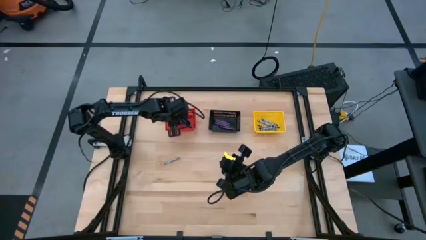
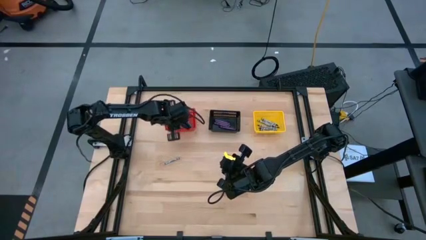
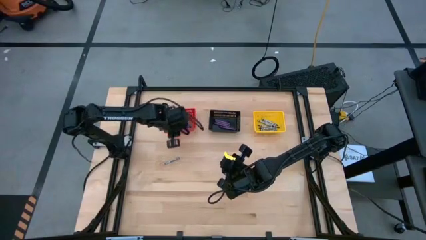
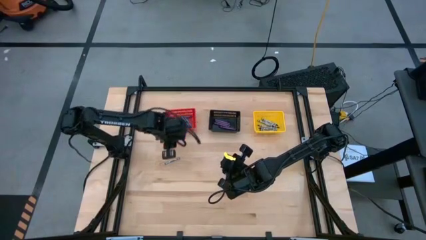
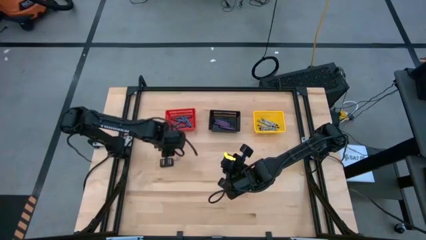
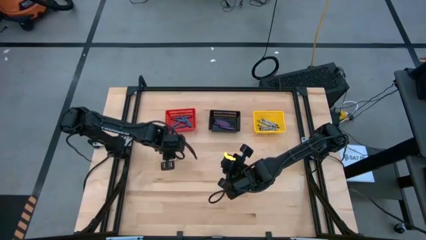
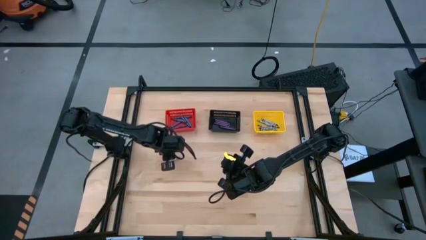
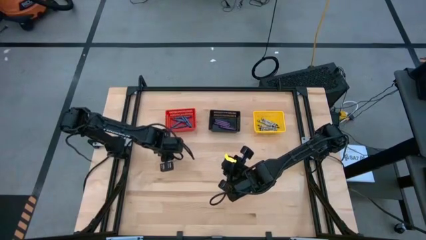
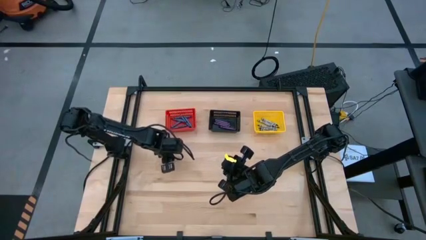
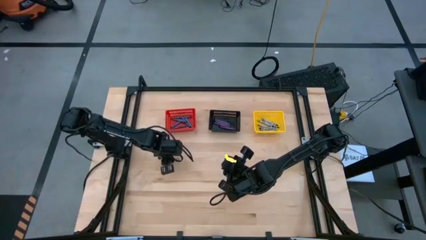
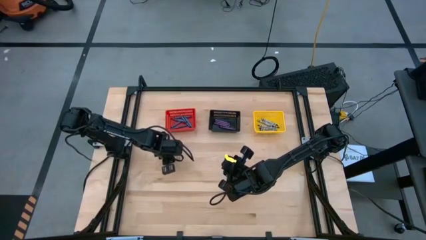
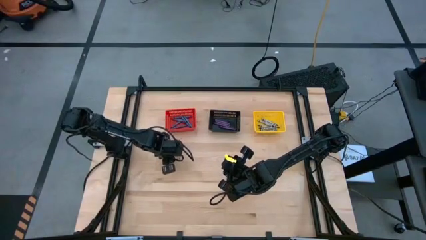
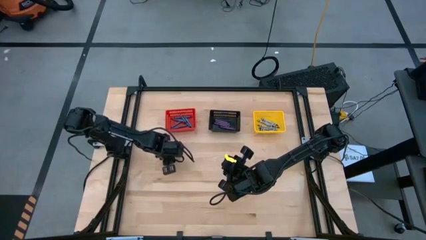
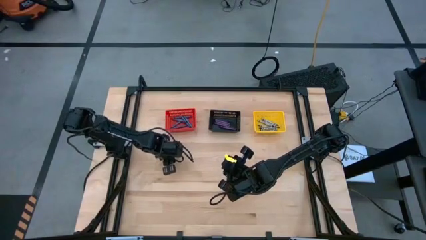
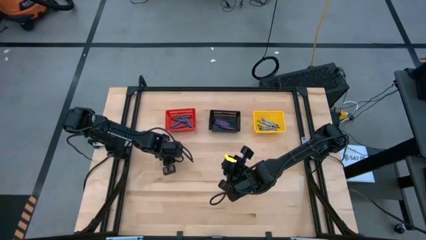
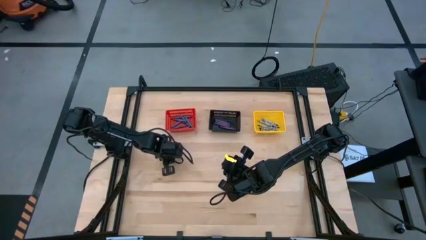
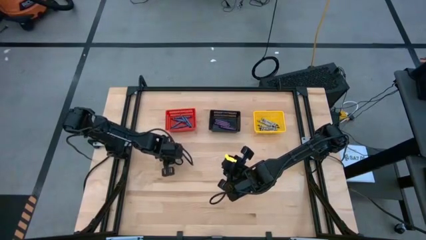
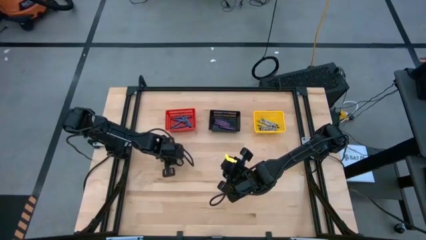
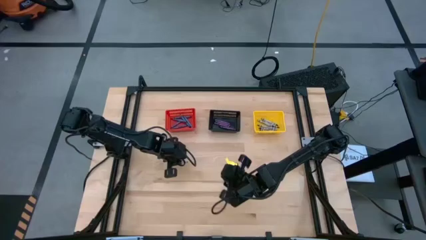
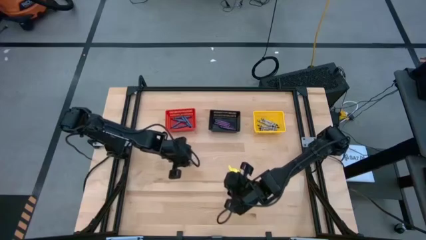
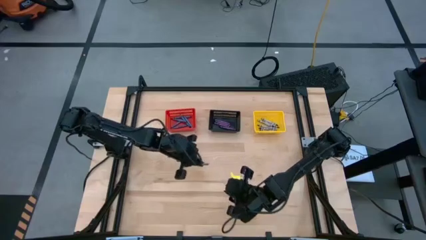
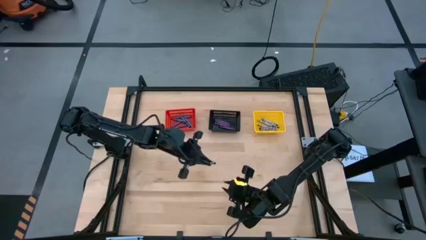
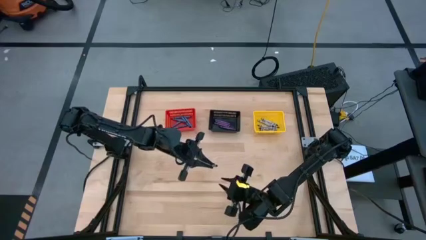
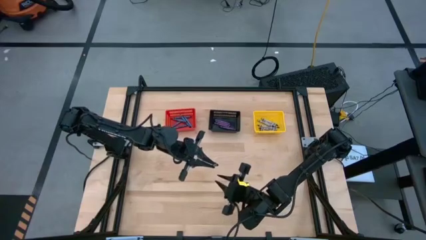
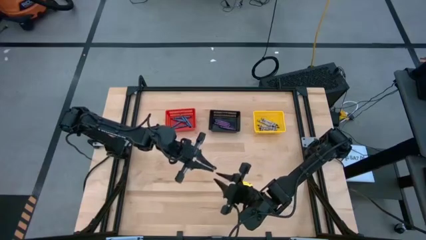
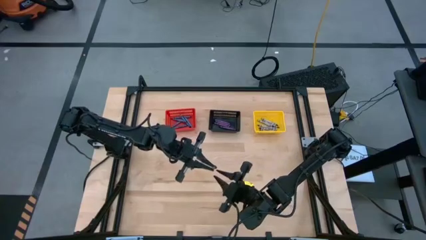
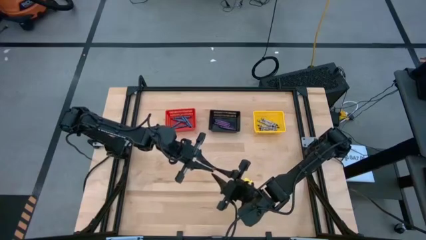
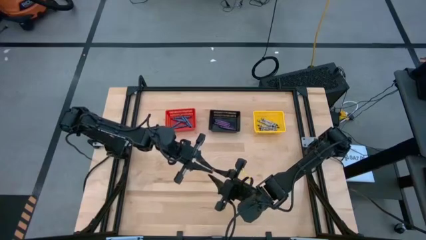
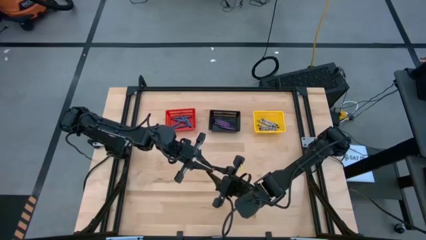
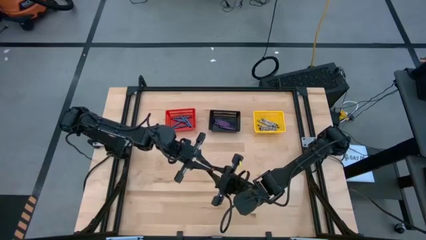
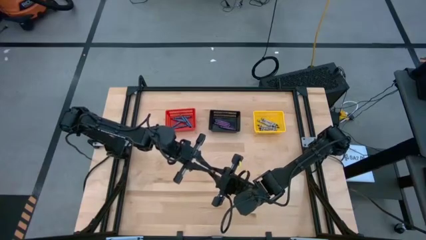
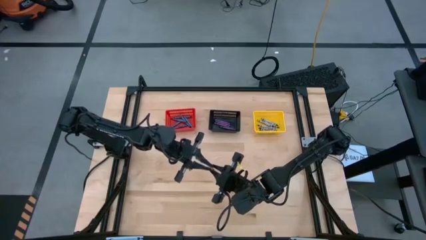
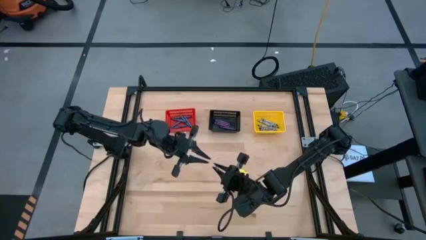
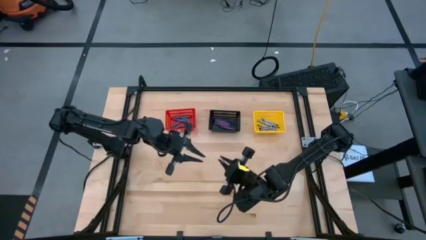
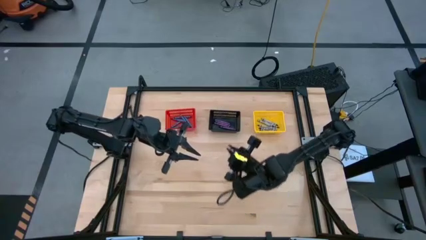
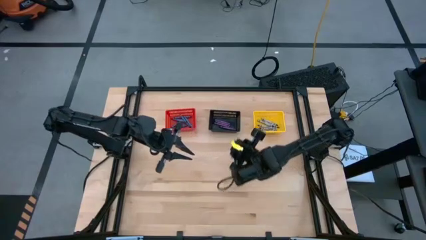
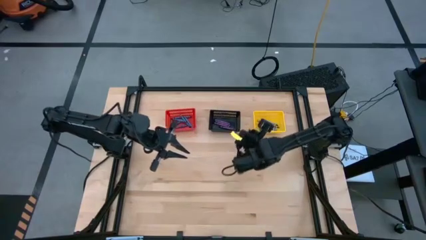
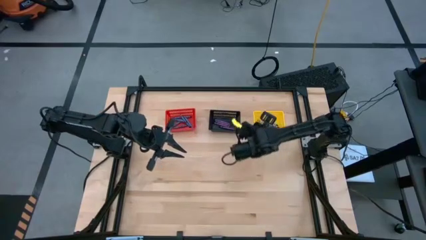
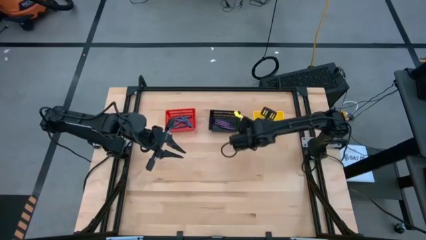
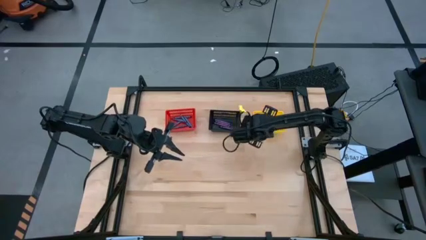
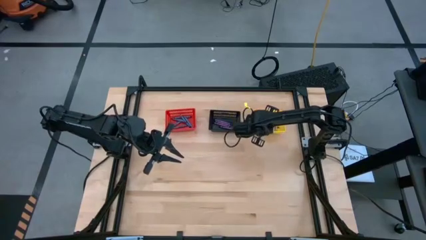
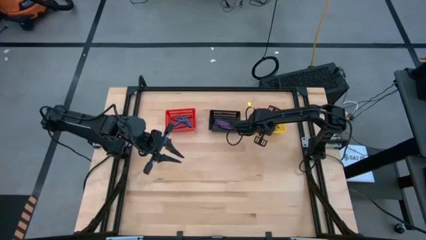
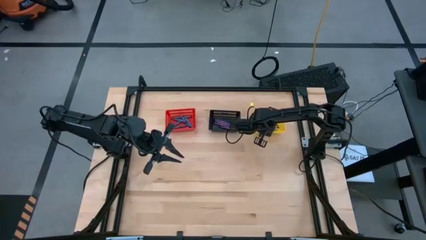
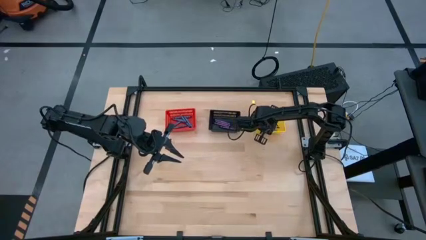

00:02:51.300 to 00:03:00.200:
Task: Sort crayons
Put the black crayon into the yellow bin

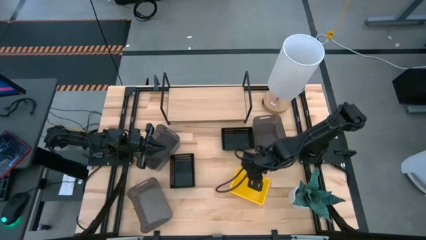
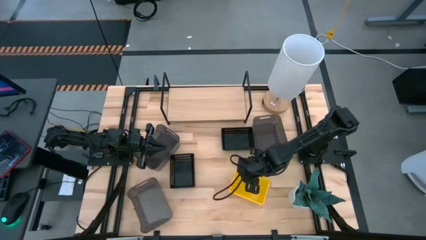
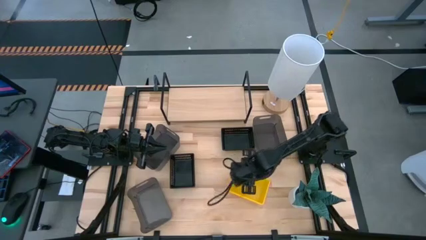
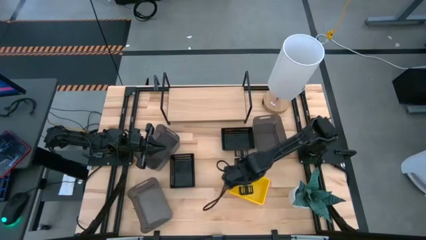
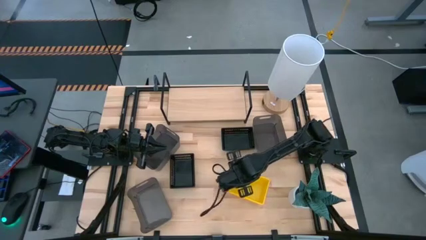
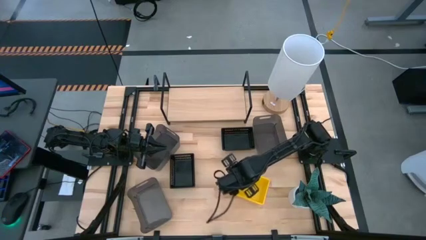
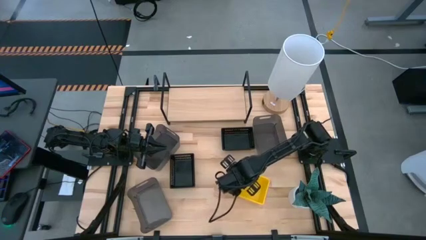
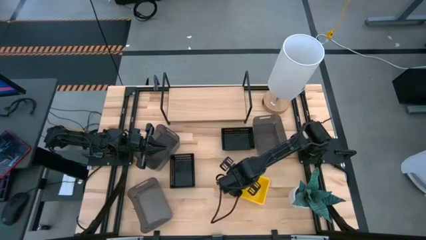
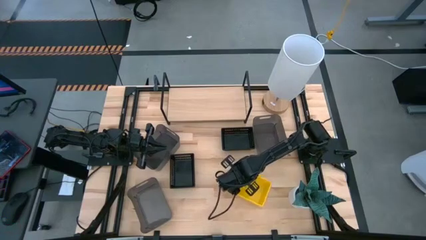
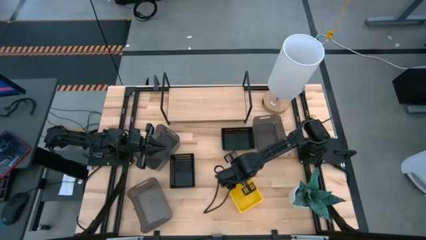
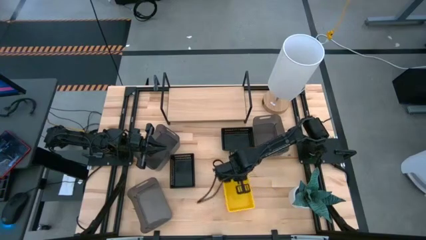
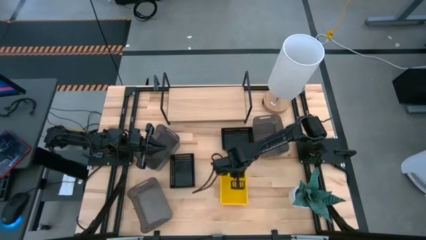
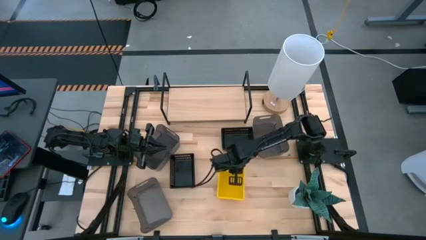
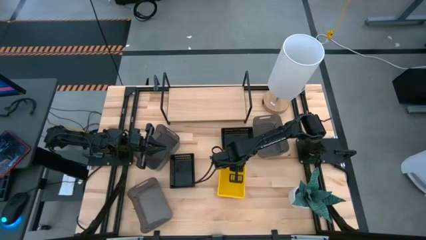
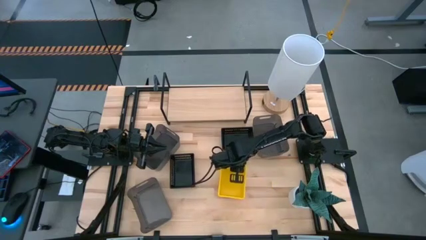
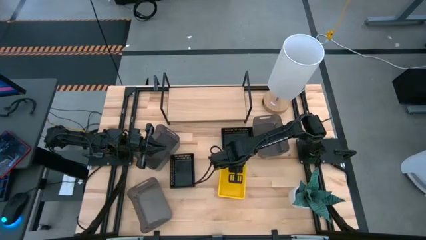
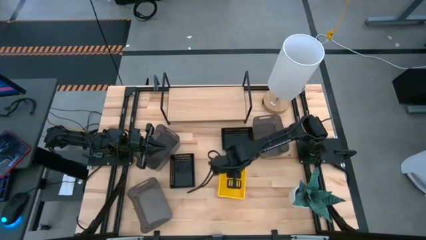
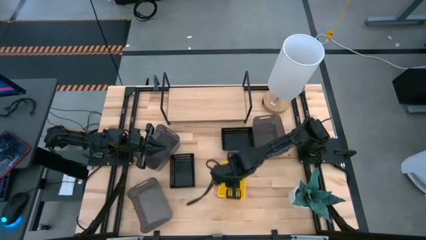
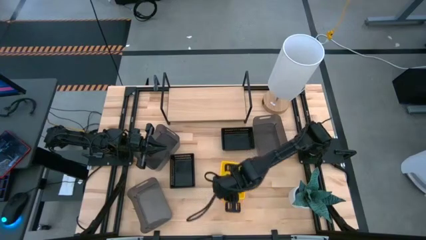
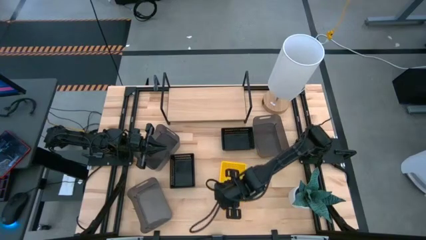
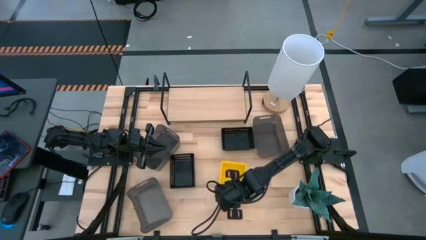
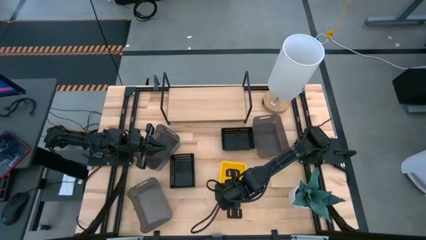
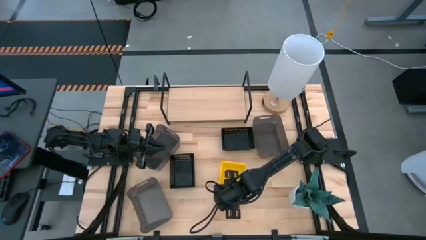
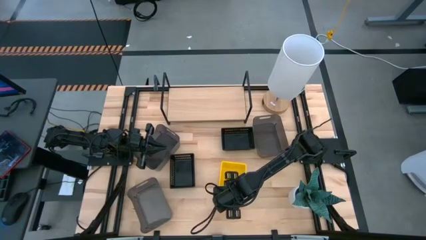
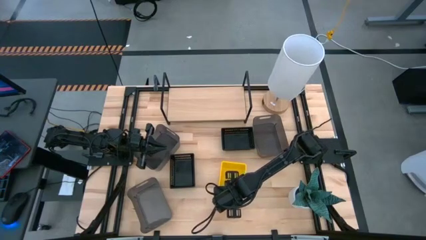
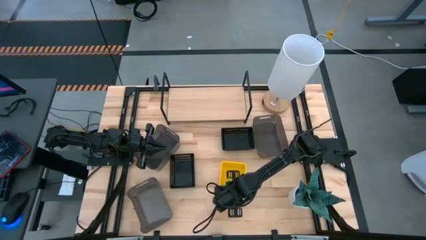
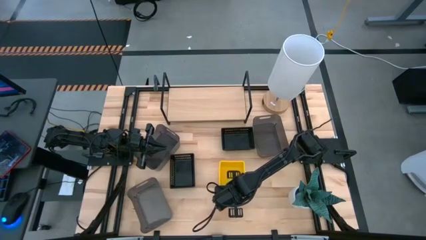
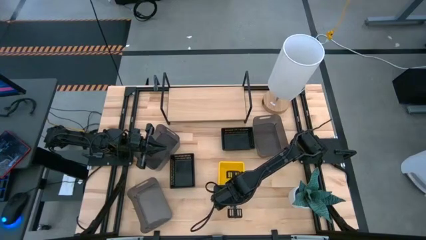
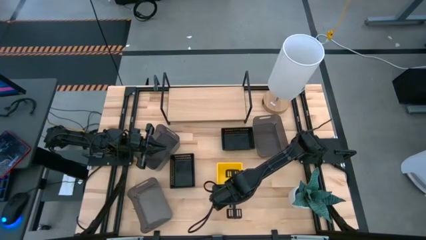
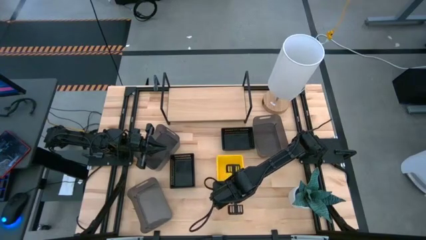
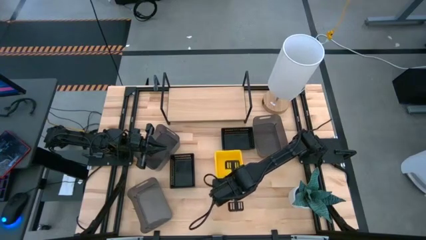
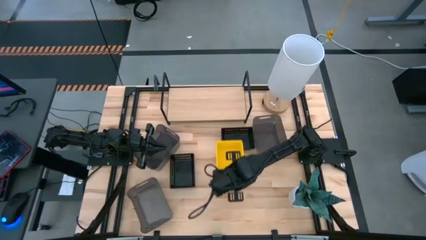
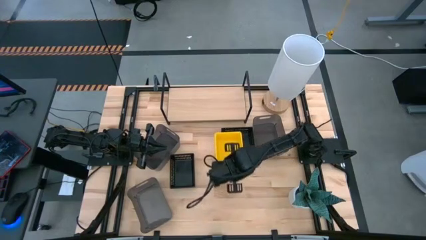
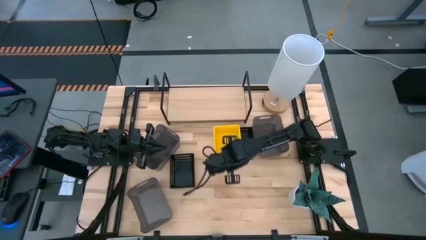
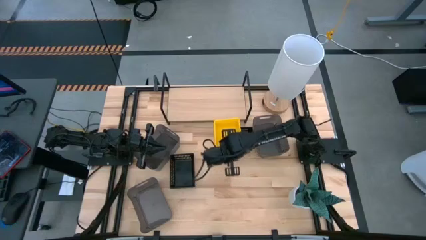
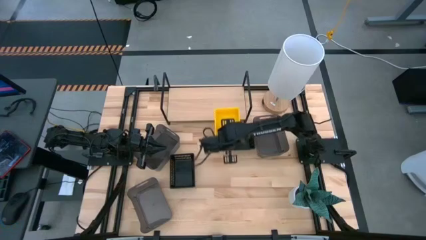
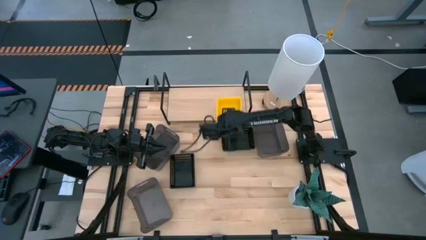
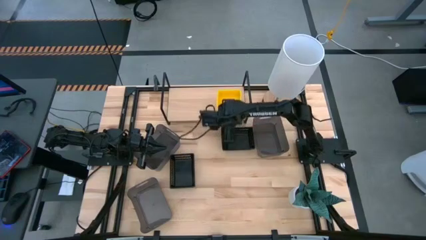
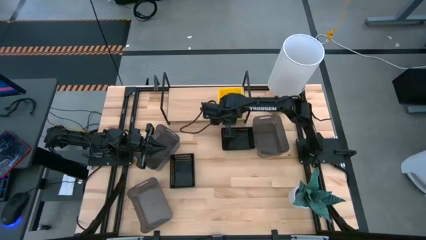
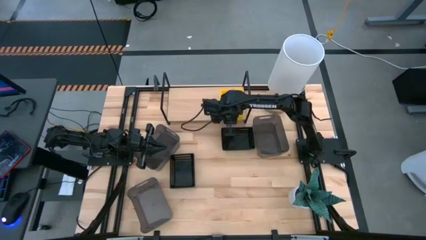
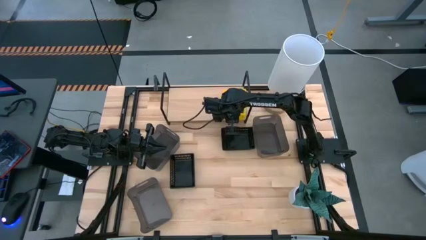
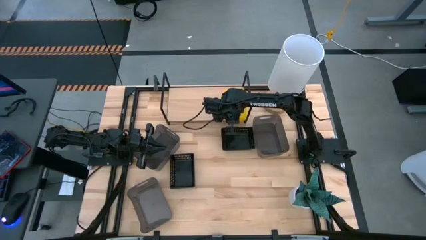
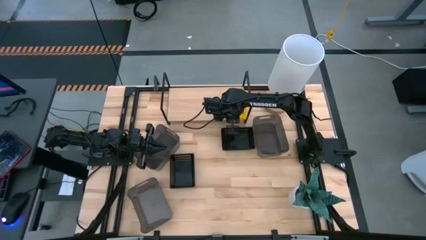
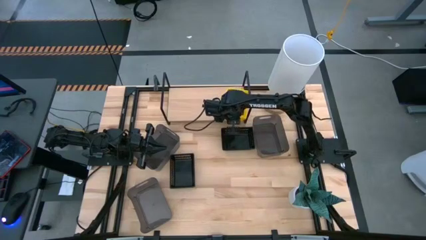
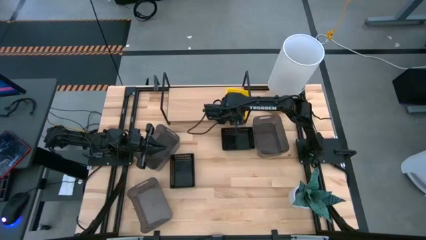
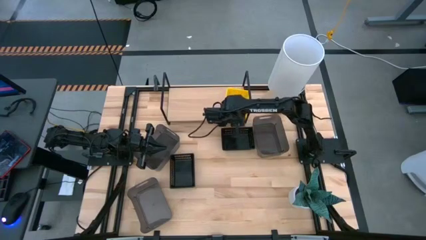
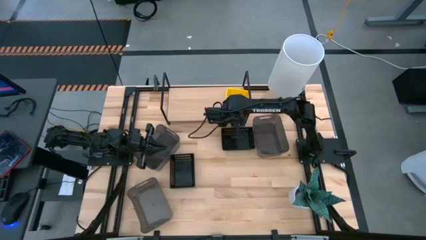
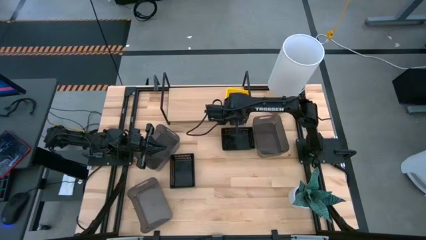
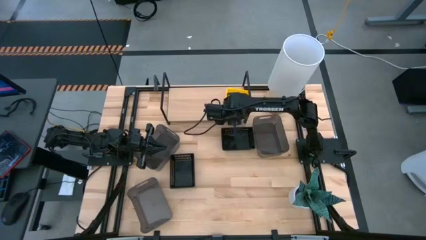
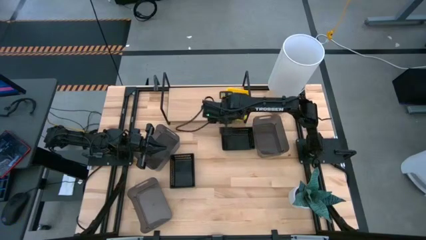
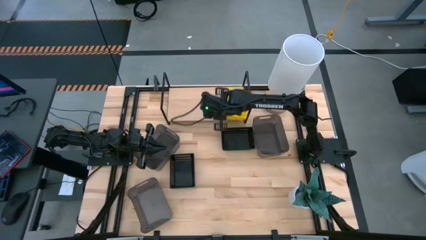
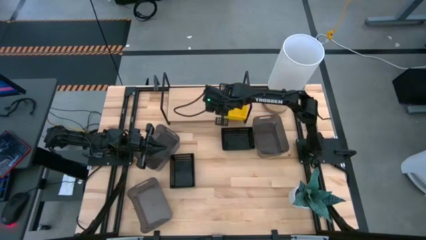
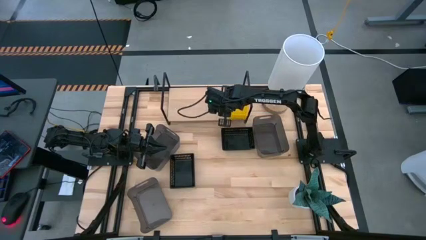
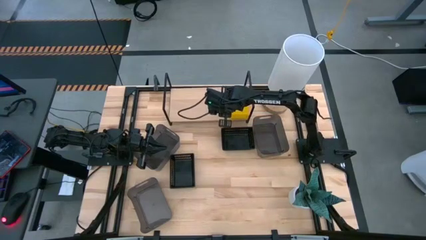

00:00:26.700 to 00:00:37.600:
Task: Stack baskets on shelf by color
Put the stacked yellow bins on the shelf
